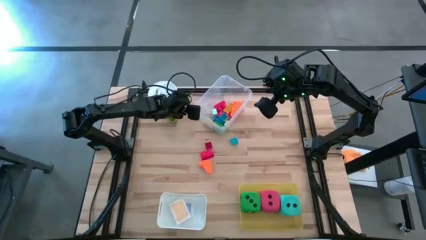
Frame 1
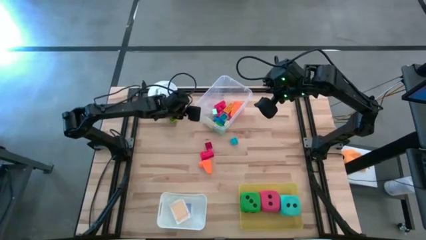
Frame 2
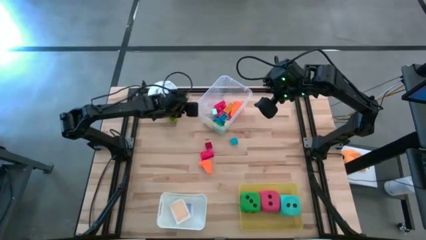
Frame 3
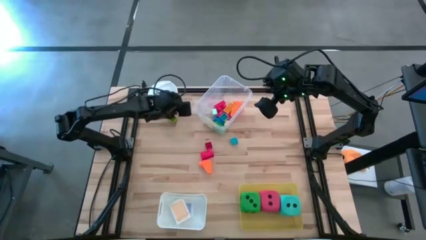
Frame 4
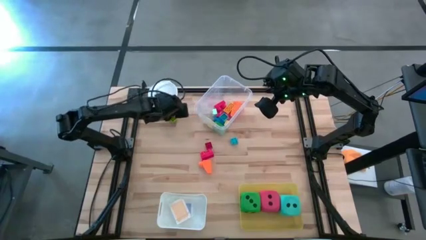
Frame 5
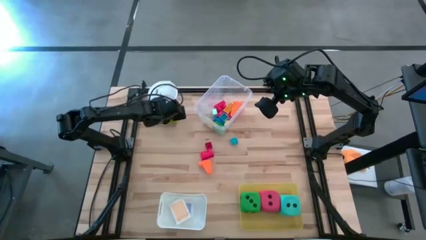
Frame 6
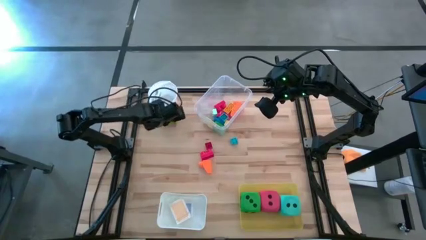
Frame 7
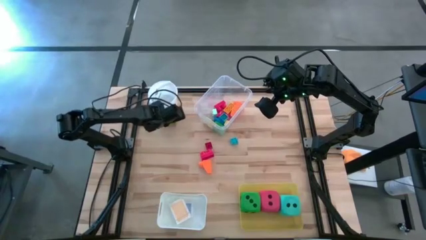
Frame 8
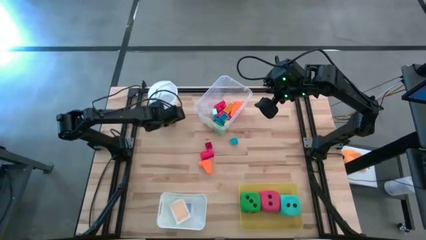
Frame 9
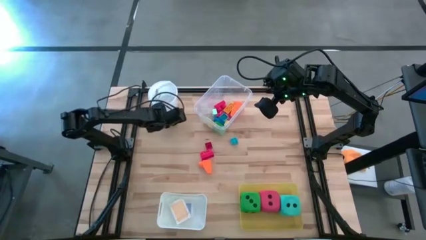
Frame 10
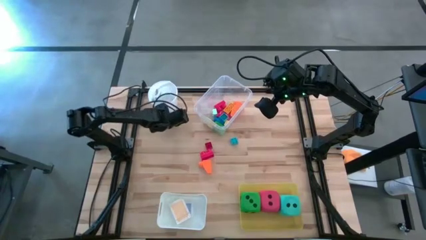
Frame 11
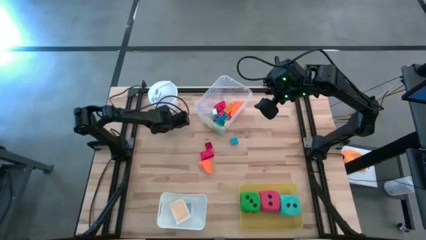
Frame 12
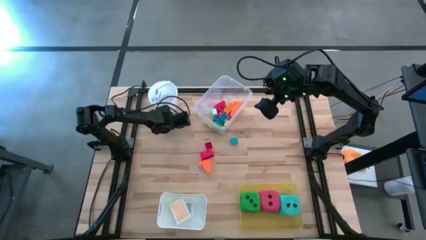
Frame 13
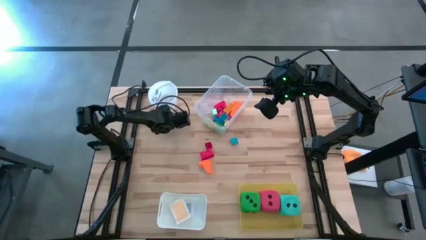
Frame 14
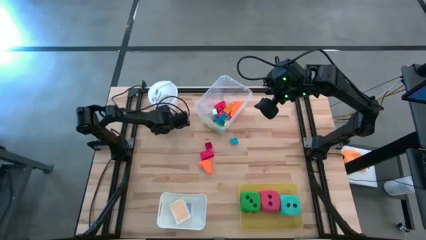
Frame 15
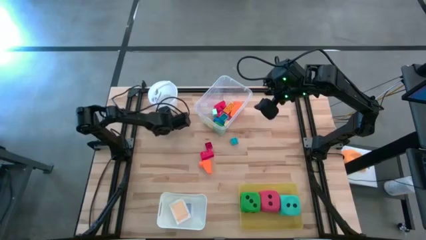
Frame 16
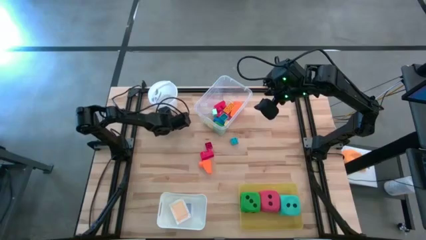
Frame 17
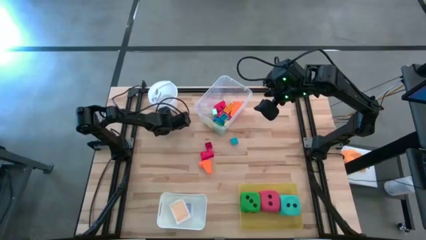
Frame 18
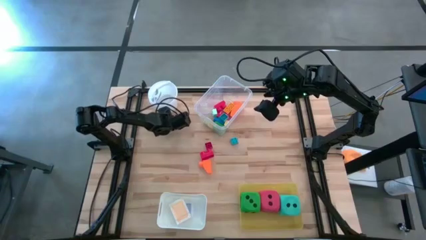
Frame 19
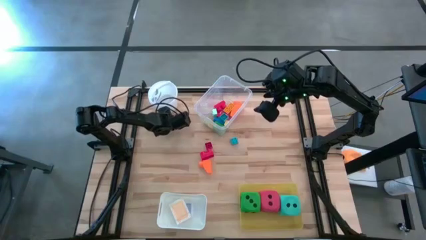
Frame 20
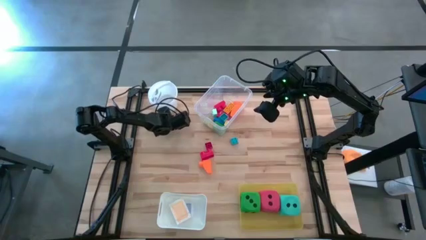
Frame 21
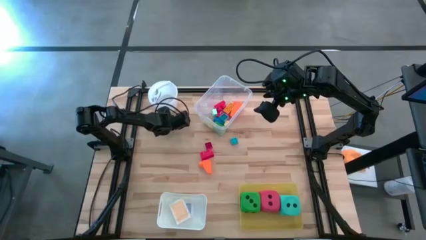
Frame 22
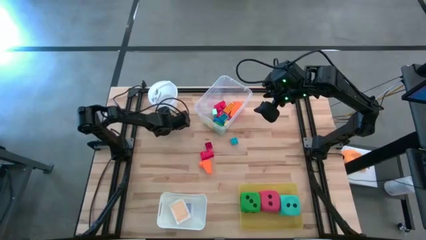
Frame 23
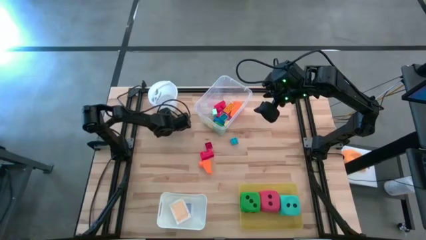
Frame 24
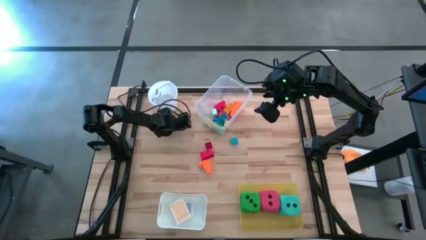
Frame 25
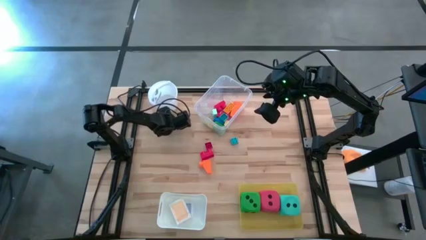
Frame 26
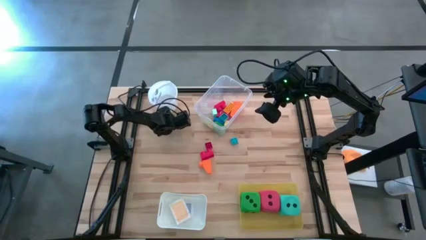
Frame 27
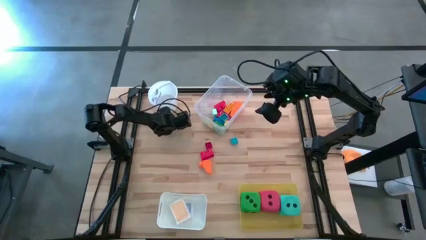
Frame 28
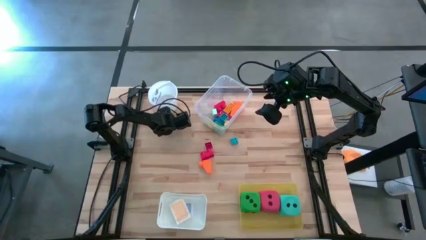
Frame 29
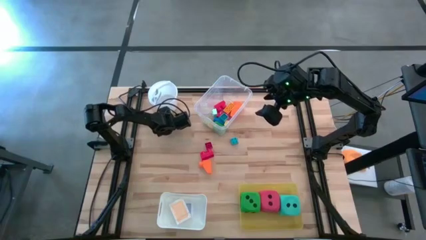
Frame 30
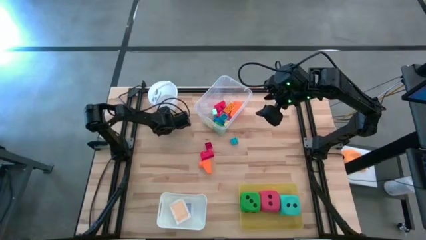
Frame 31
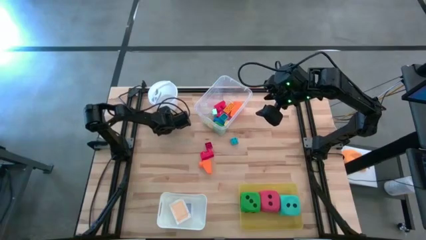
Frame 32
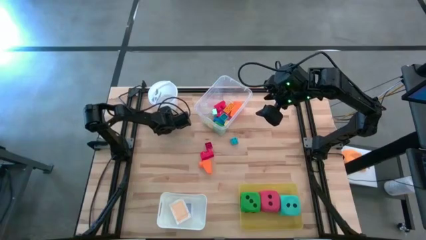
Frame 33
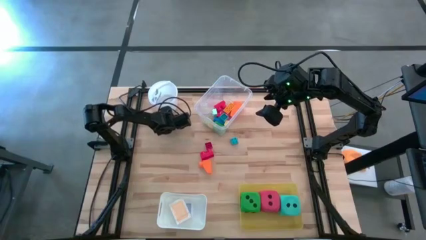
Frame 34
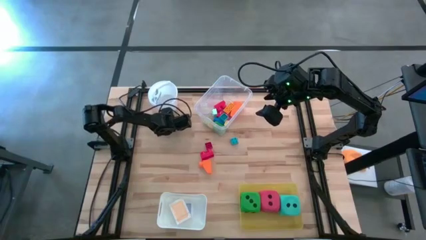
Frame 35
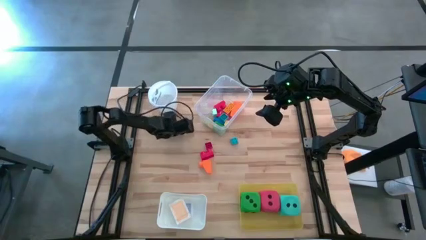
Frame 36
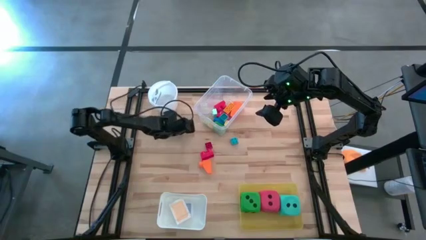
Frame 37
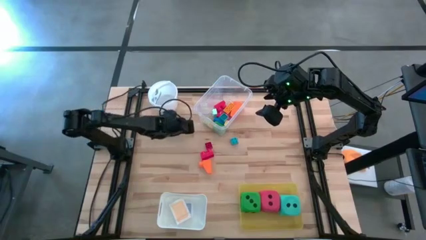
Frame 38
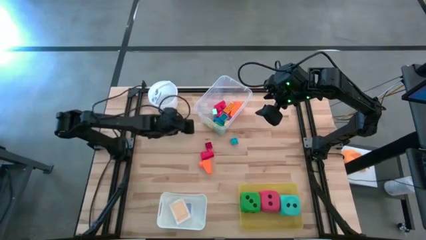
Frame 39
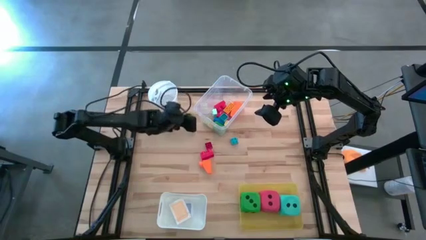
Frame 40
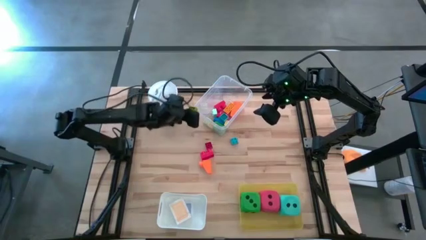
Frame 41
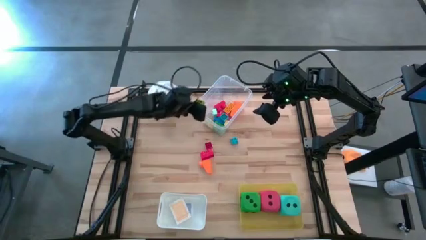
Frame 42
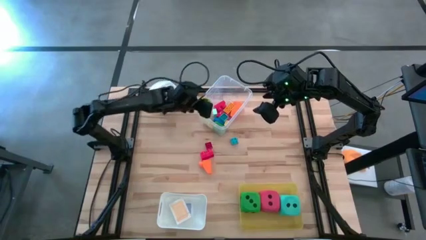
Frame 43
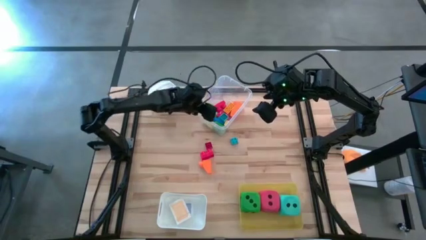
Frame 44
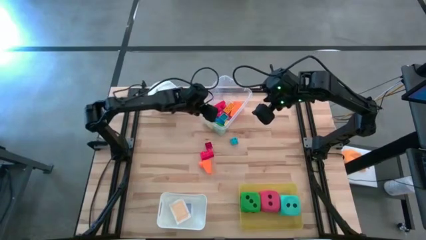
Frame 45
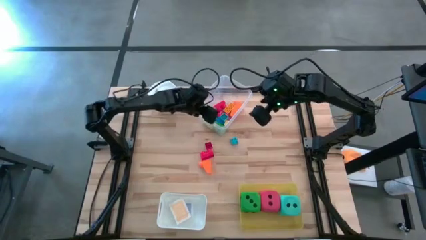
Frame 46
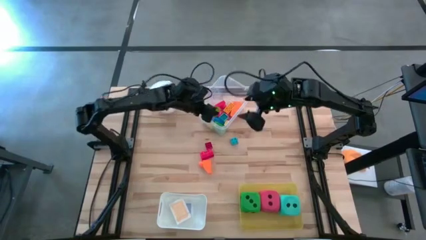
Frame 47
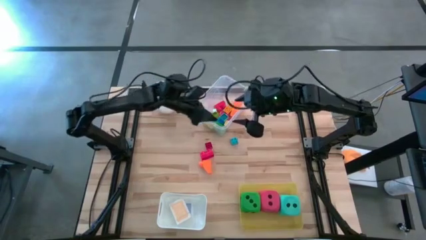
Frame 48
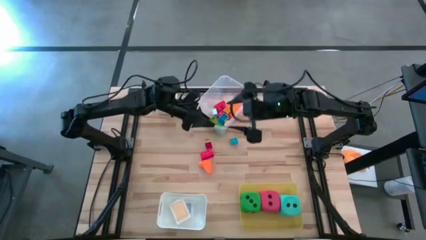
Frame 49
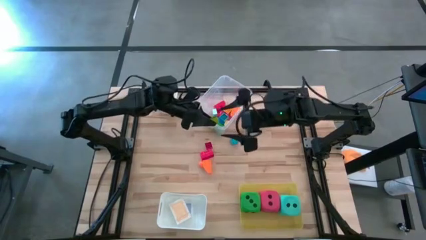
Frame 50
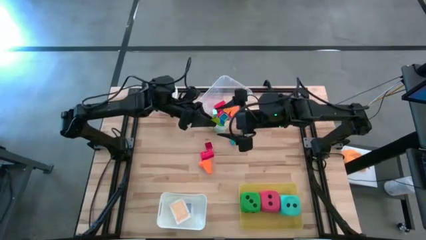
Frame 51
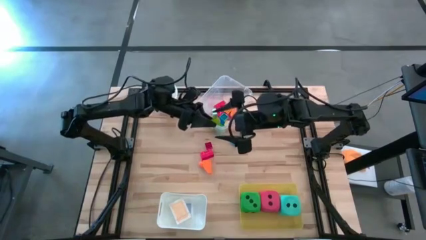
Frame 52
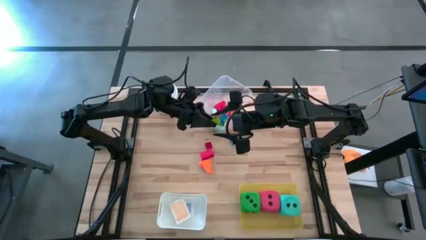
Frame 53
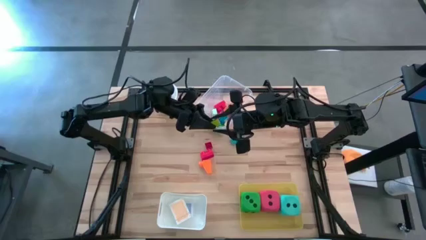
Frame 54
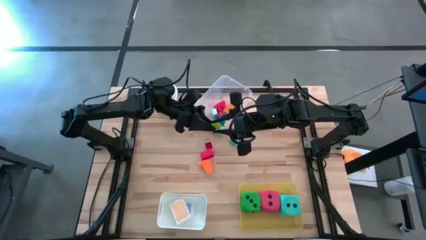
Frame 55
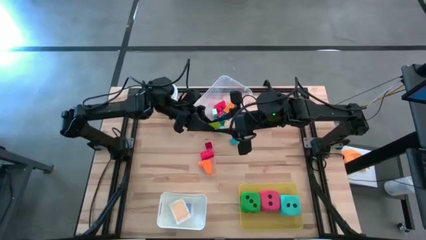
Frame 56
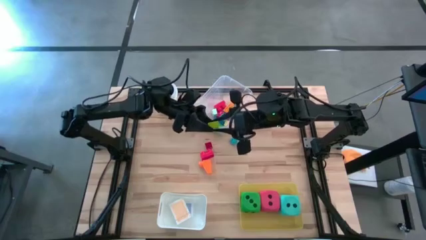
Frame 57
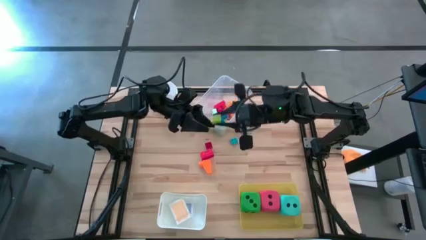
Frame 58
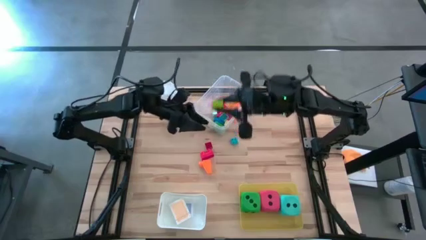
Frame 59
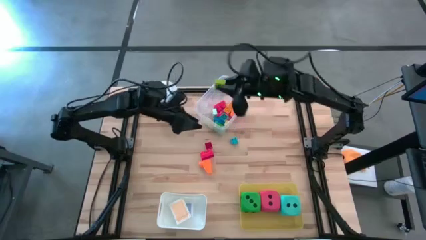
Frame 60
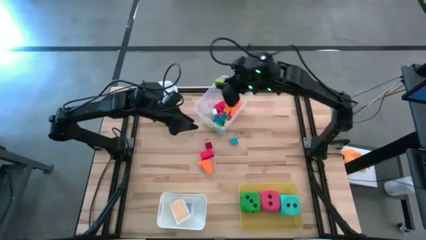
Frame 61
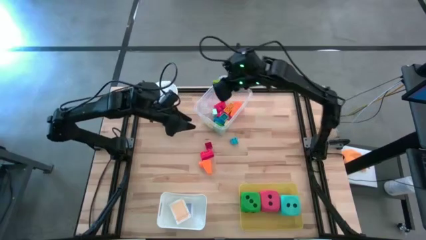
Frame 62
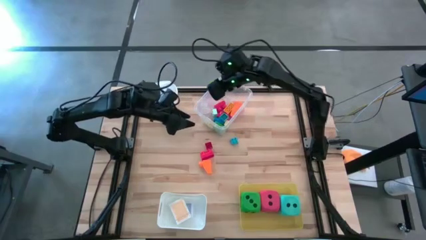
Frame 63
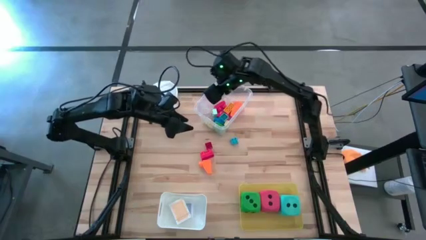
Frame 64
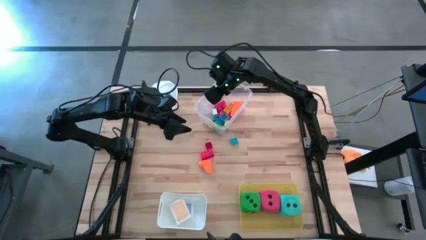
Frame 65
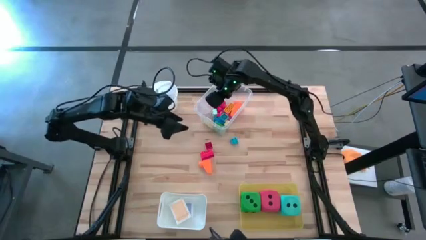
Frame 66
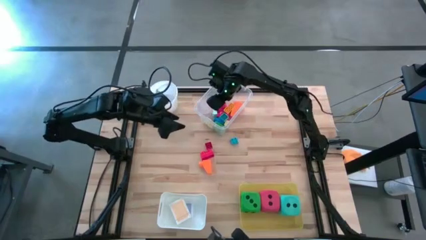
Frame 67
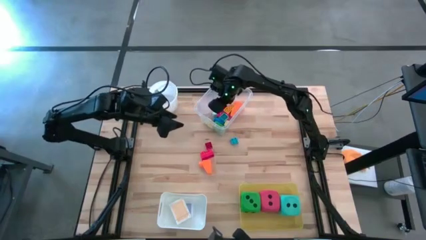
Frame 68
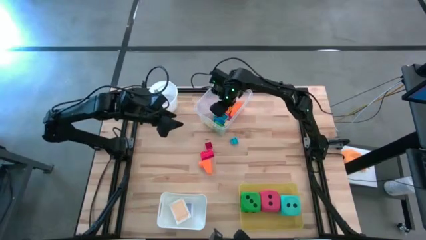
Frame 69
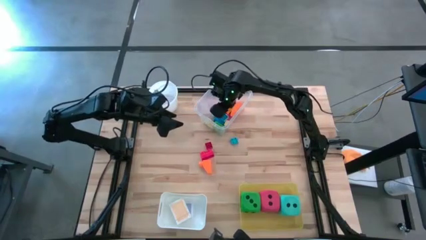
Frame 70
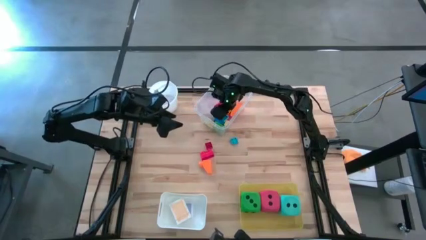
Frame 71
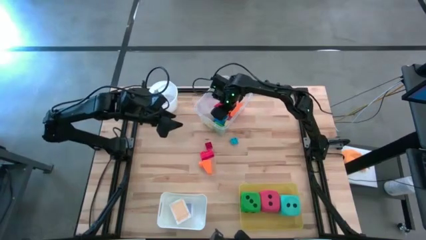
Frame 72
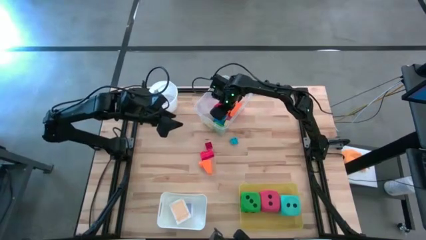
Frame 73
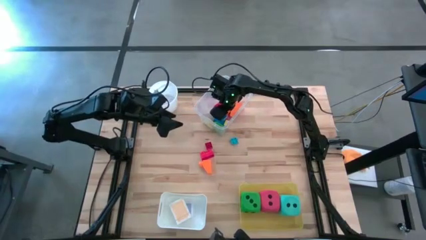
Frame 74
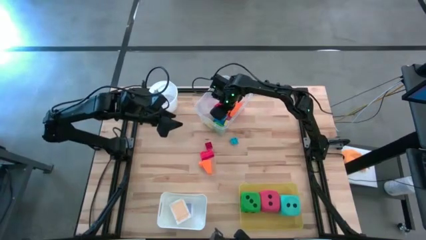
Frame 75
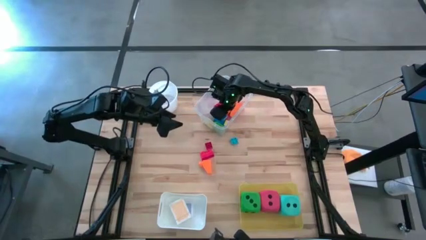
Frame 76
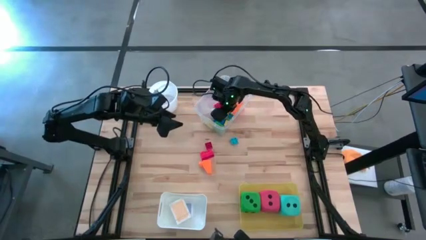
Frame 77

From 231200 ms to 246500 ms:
Task: Pick & Place Toys
Put the green game piece into the transparent bin
